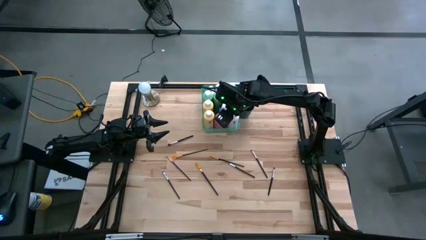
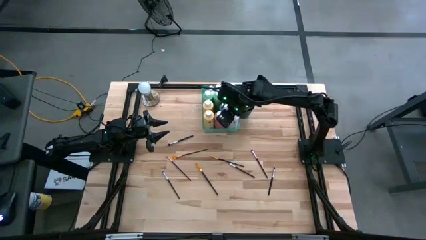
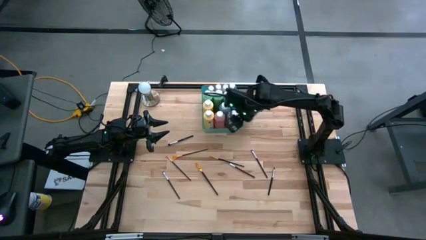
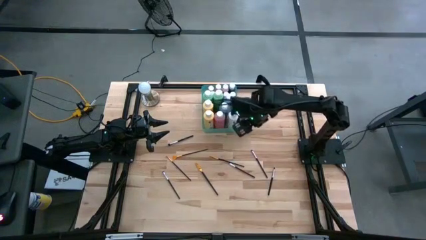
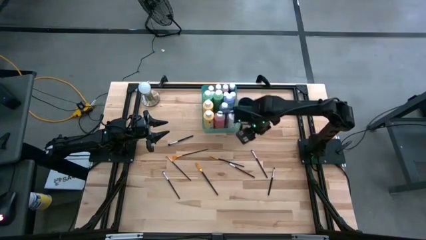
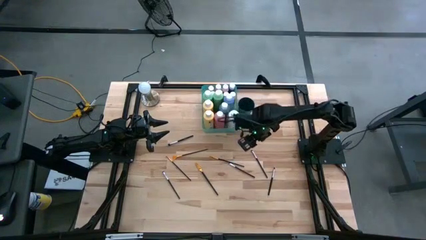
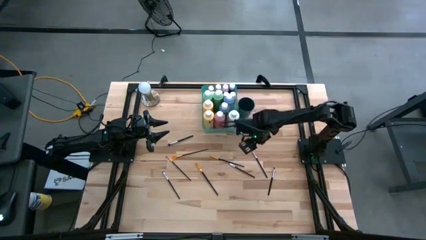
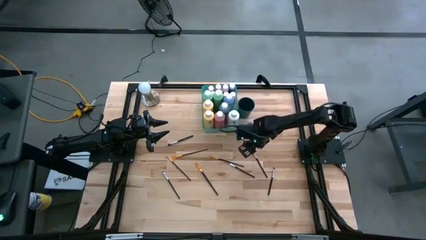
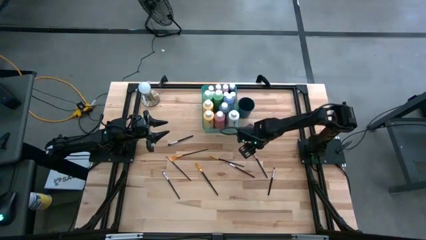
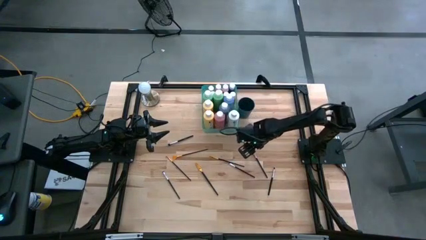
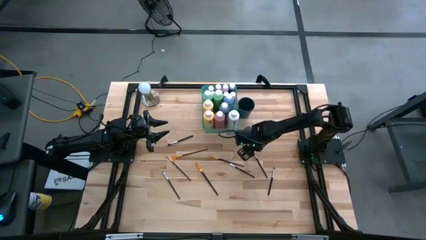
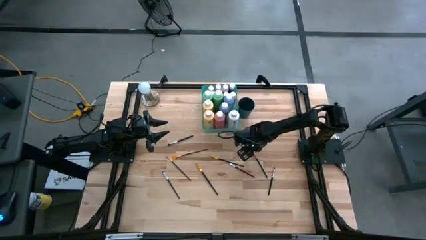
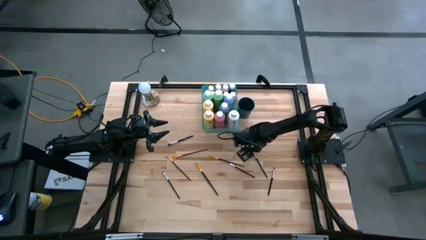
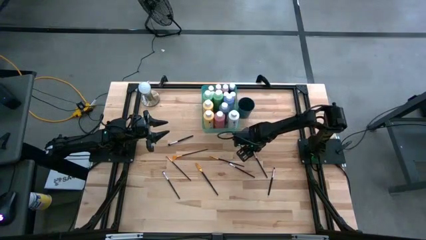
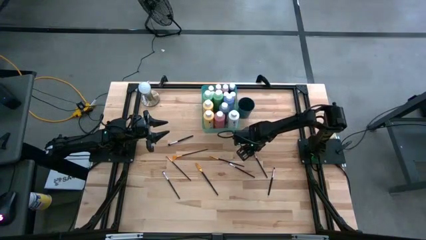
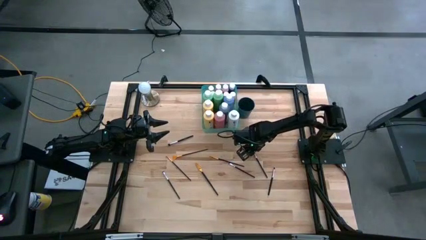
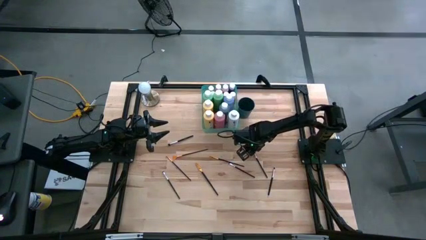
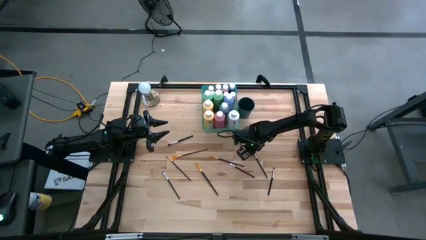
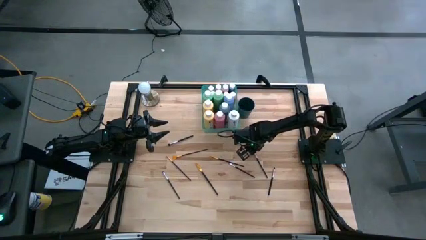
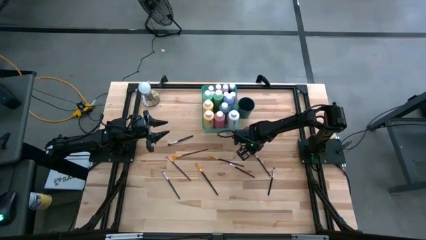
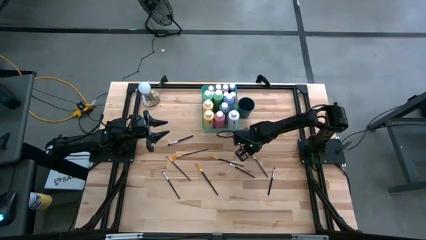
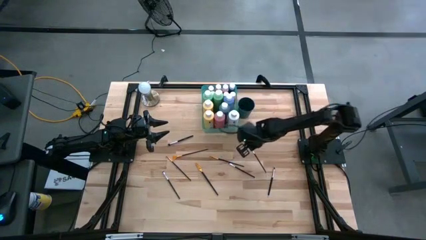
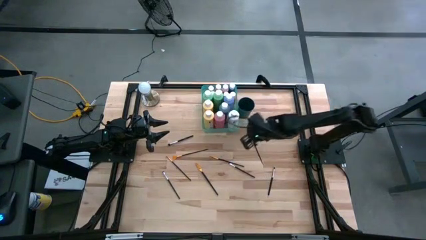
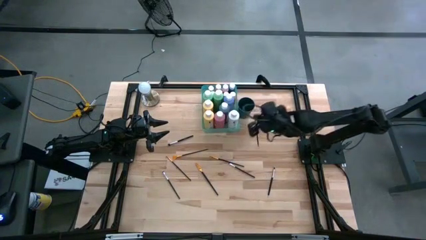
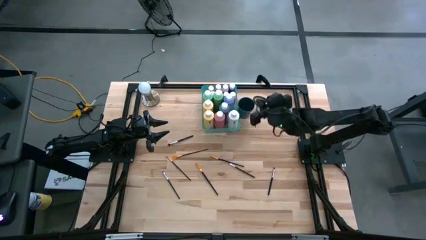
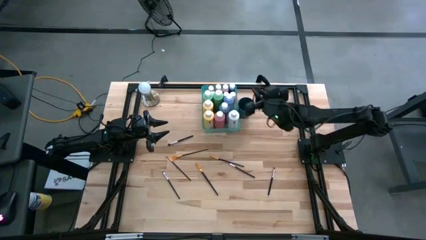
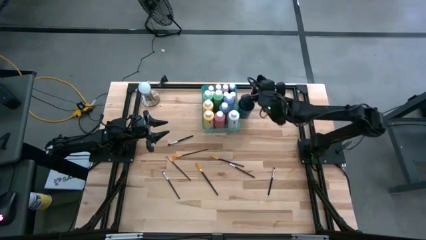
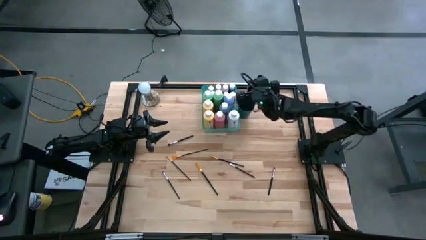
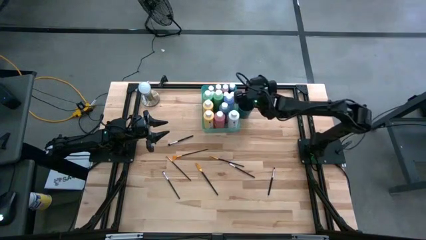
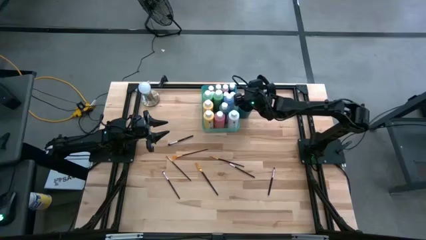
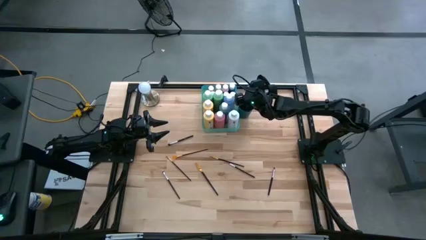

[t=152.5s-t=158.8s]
Task: Pick & Place Paint Supplies
Put the silver paint brush into the green cup

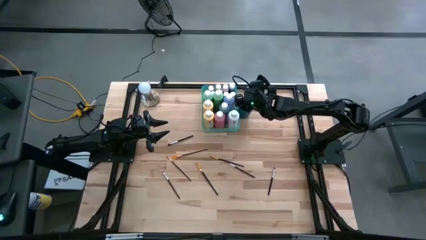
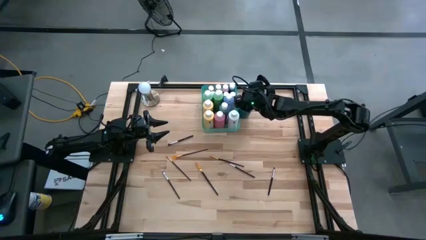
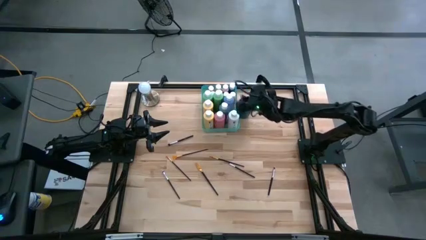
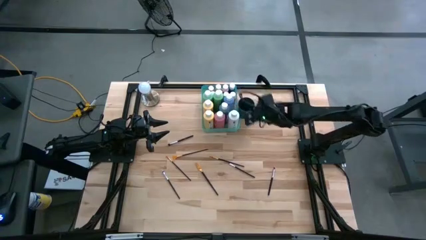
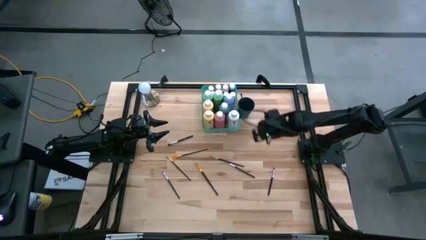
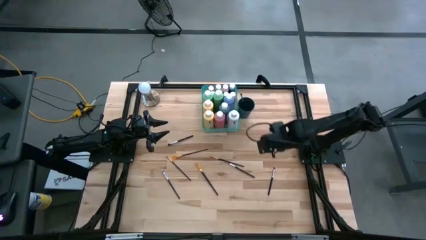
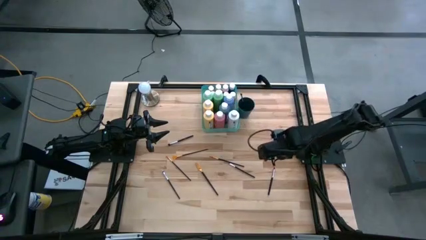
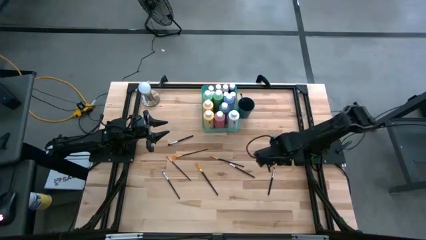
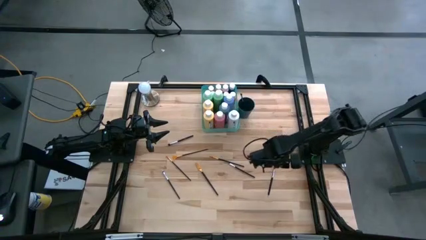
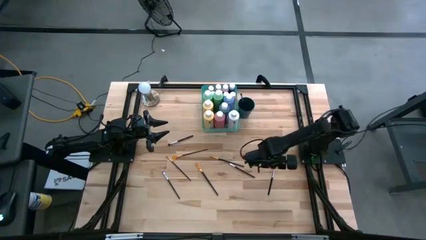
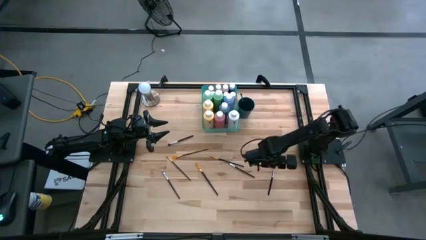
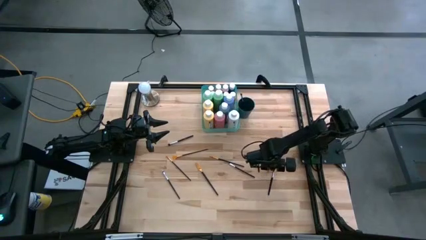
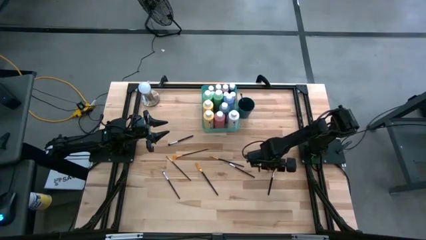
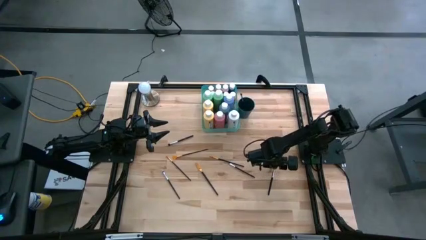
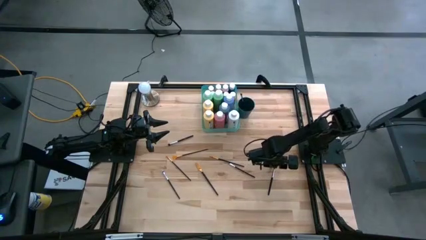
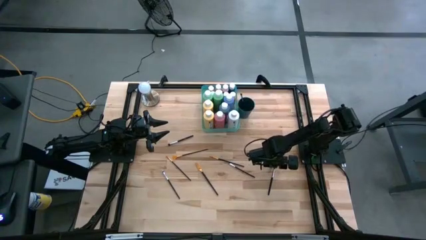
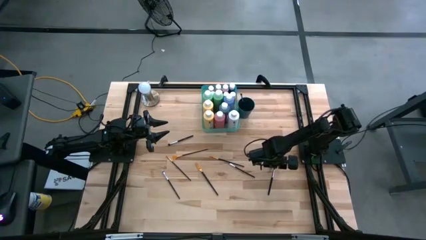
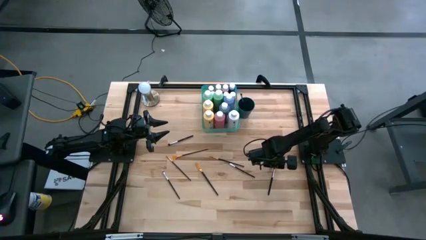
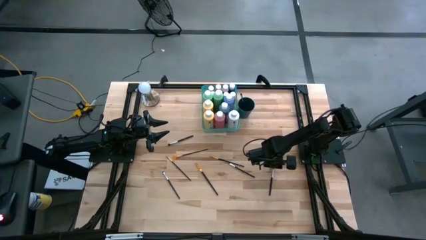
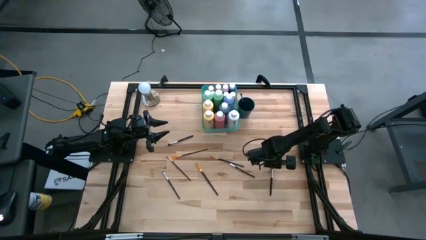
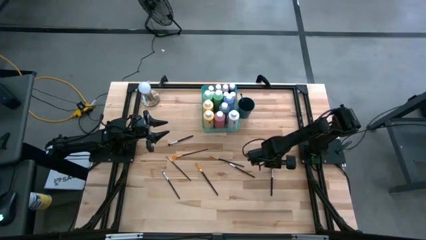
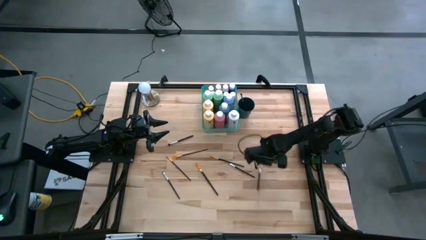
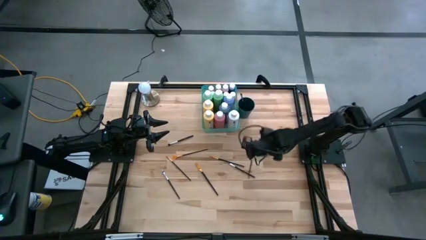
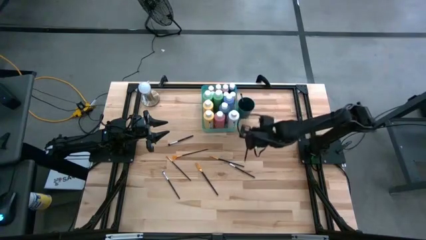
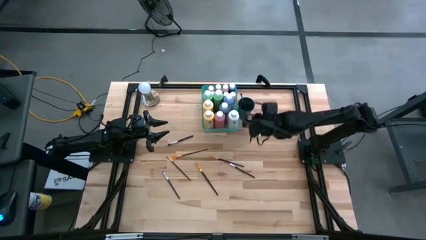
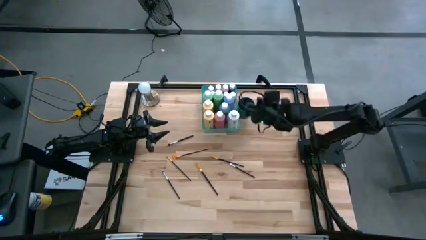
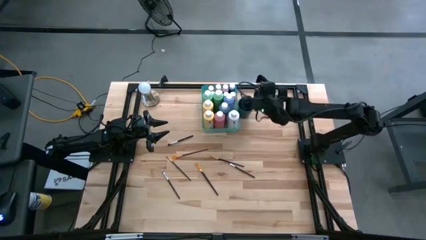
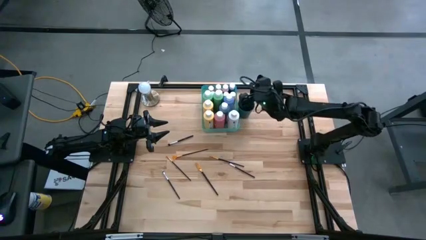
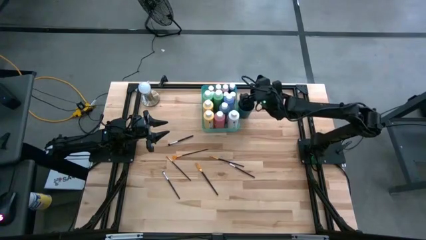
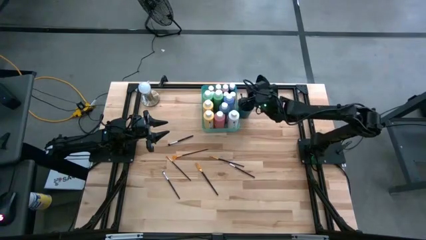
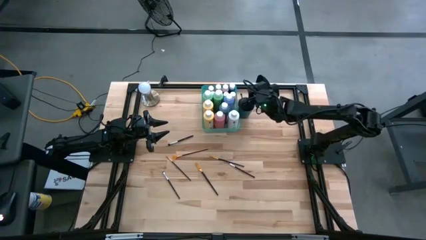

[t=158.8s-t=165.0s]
Put the silver paint brush into the green cup

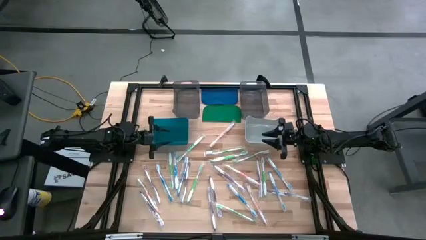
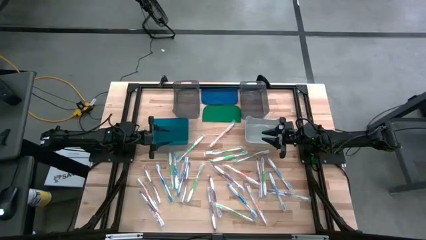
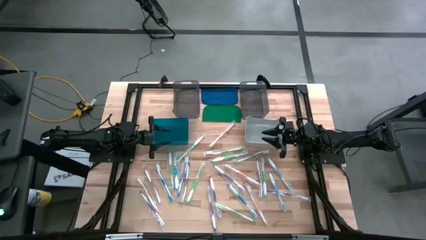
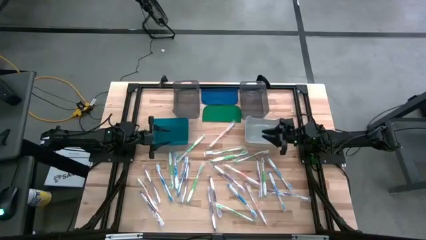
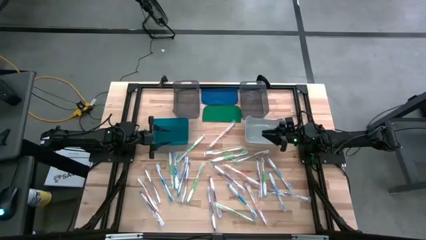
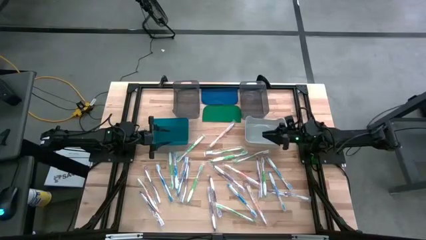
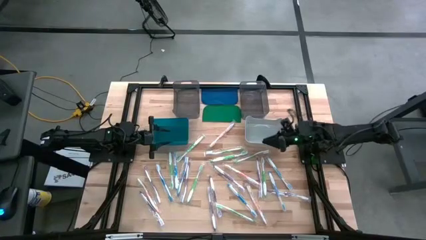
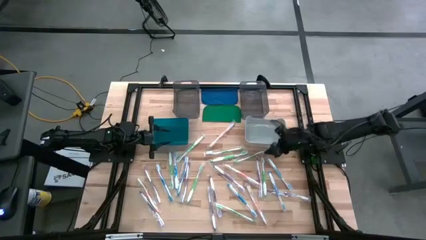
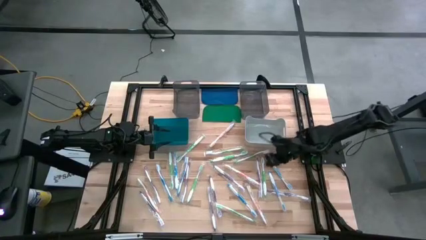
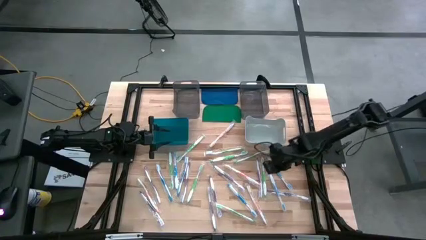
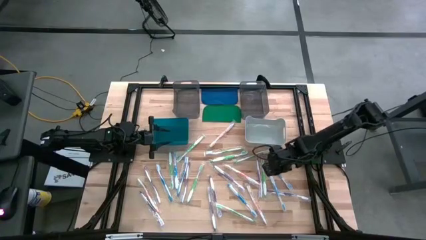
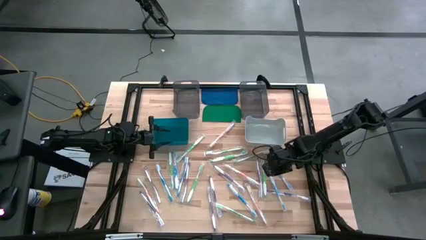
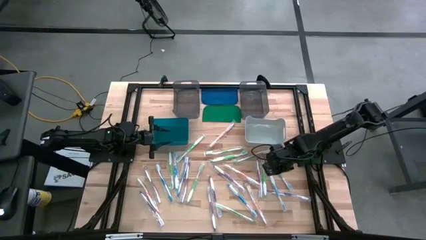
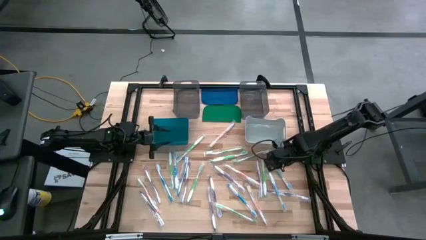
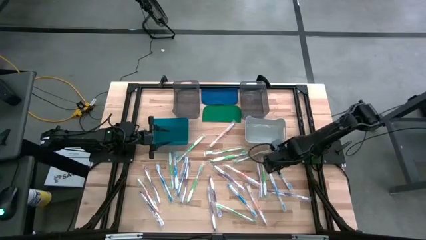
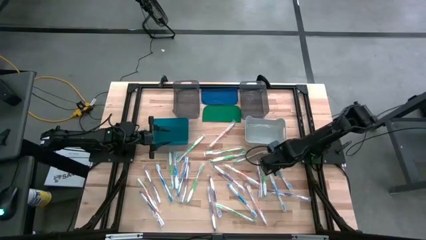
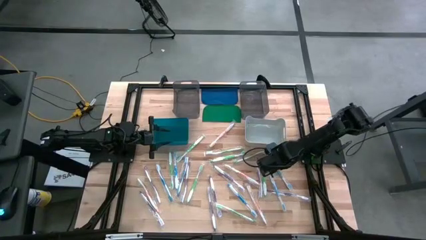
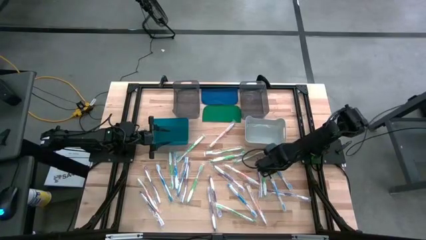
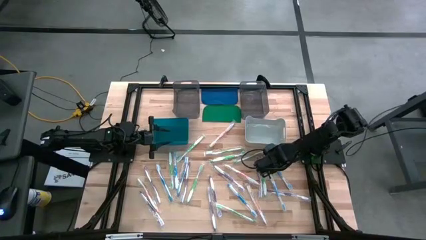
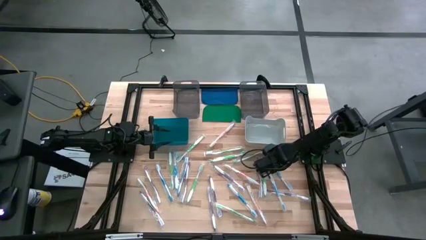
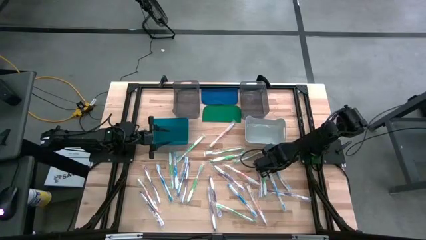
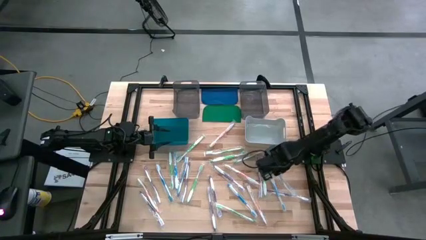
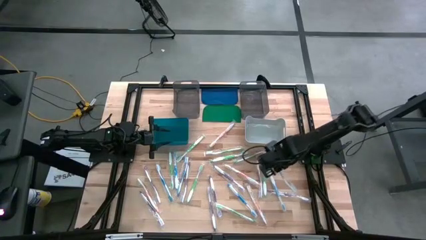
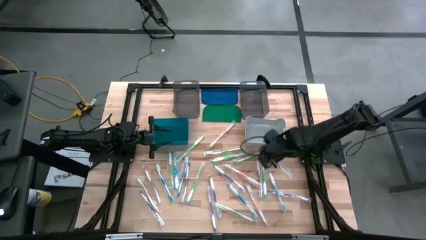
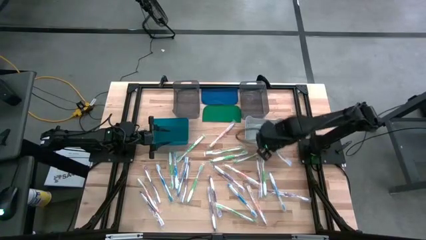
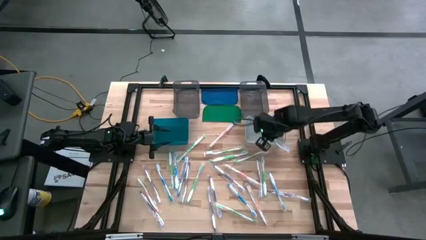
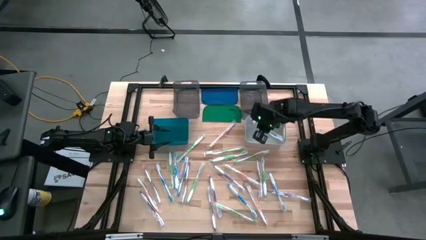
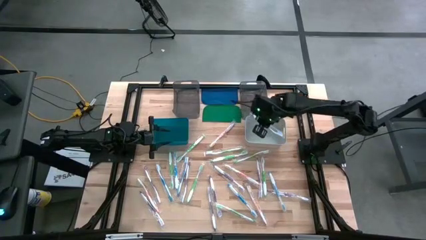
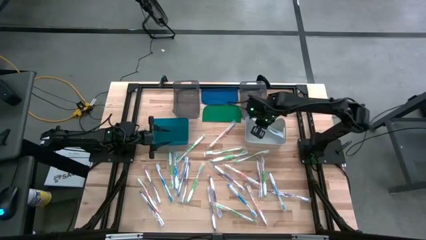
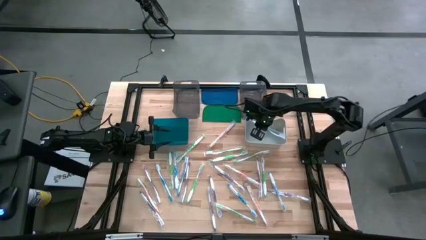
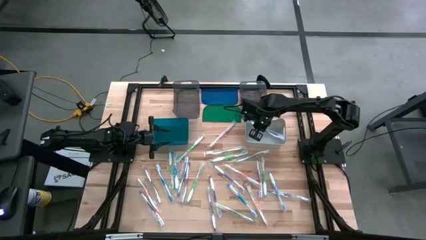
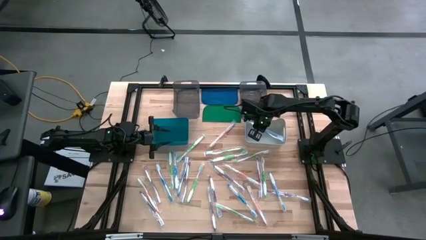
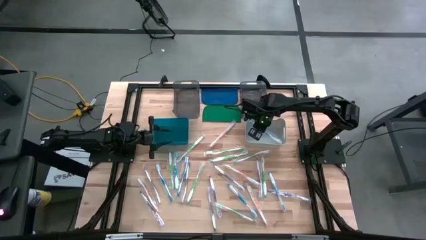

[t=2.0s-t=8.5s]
Task: Pick & Place Toothbrushes
Put the blue toothbrush into the grey bin
